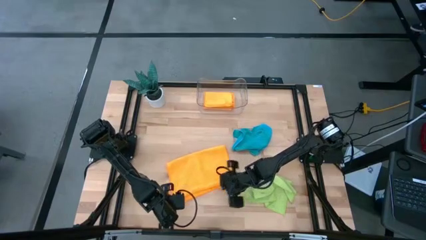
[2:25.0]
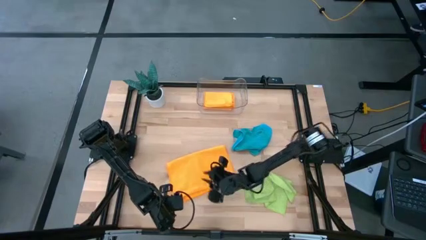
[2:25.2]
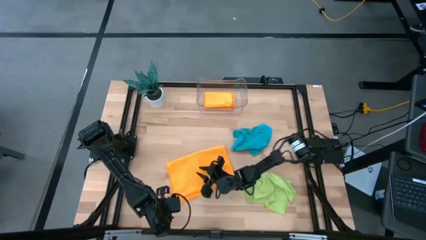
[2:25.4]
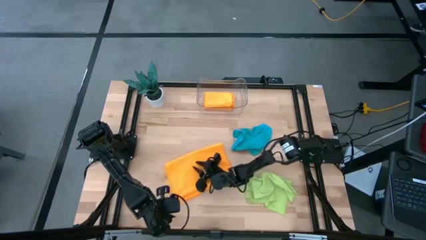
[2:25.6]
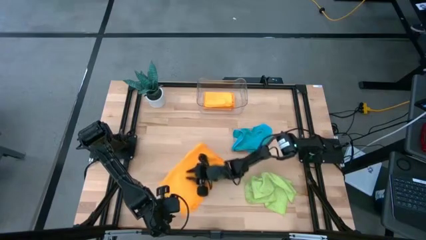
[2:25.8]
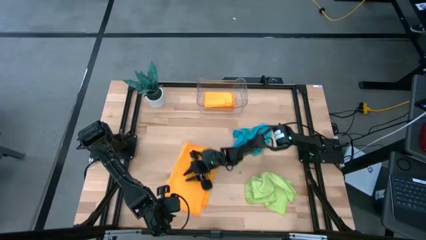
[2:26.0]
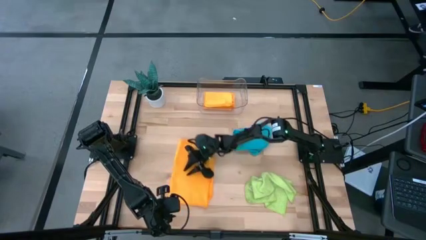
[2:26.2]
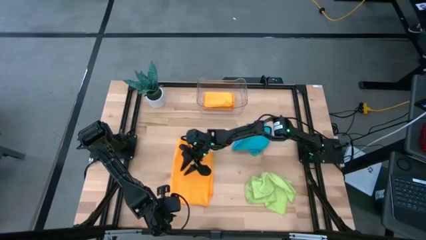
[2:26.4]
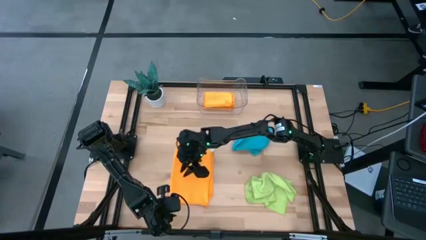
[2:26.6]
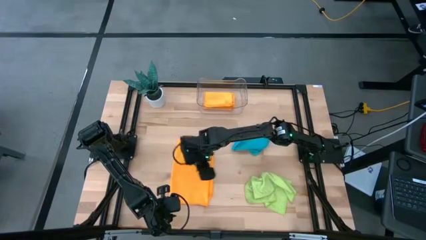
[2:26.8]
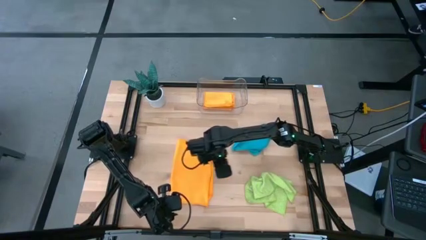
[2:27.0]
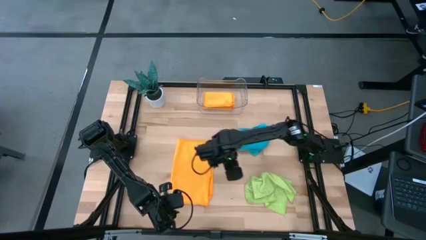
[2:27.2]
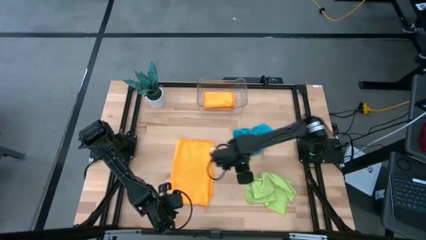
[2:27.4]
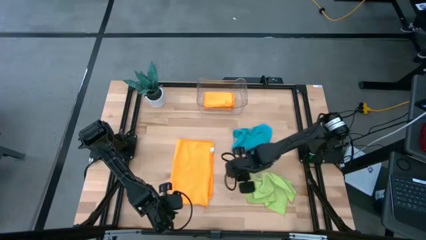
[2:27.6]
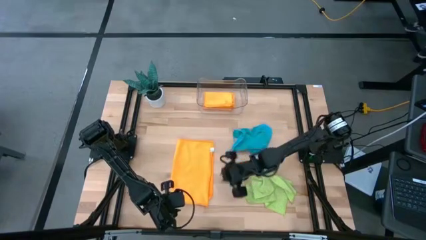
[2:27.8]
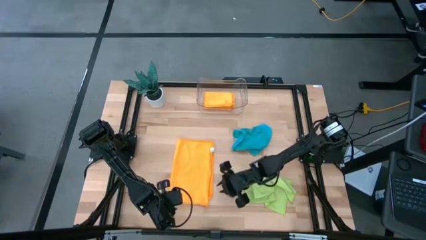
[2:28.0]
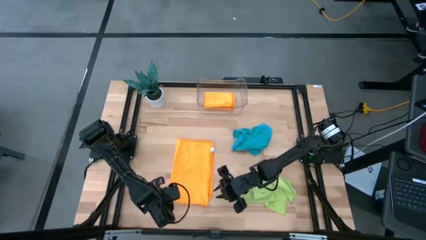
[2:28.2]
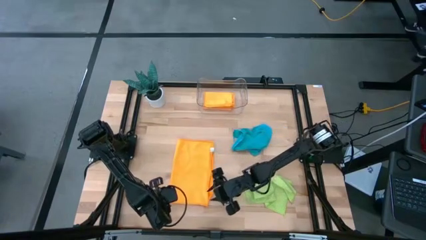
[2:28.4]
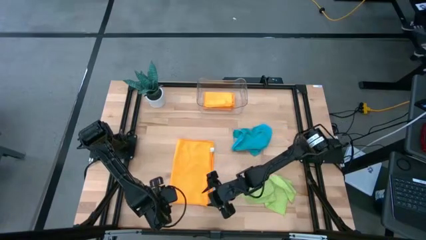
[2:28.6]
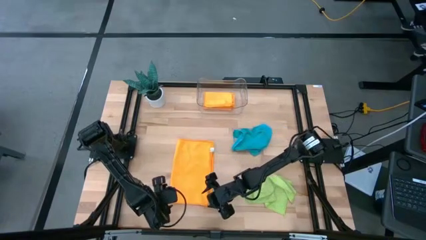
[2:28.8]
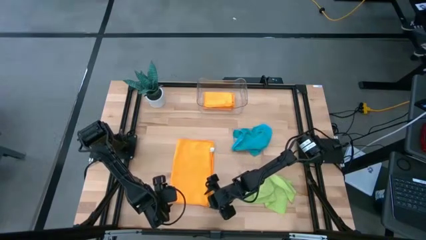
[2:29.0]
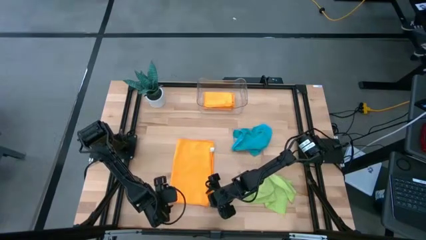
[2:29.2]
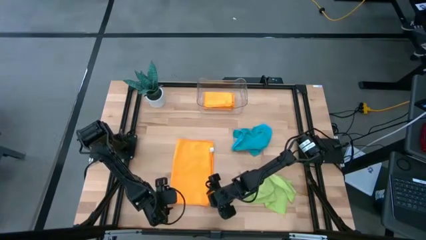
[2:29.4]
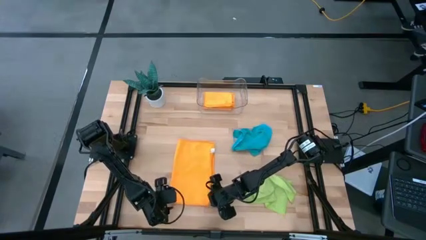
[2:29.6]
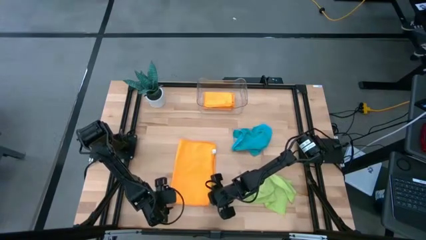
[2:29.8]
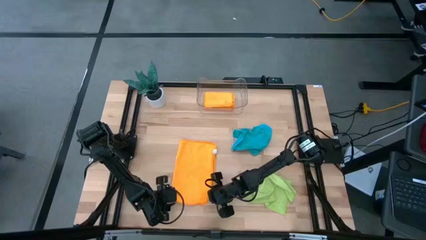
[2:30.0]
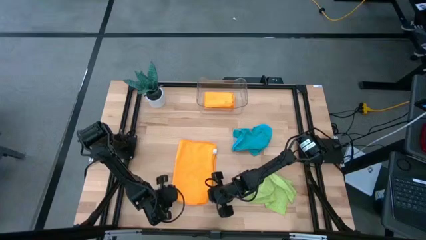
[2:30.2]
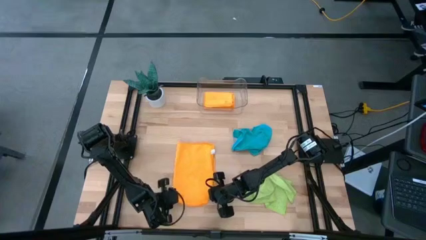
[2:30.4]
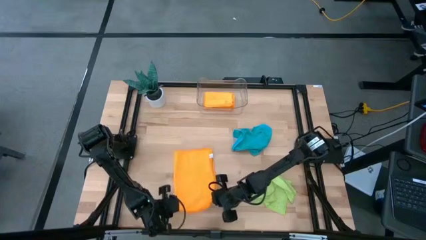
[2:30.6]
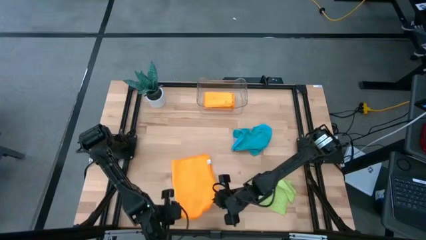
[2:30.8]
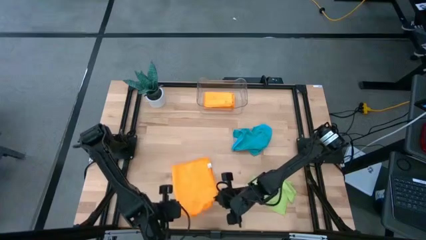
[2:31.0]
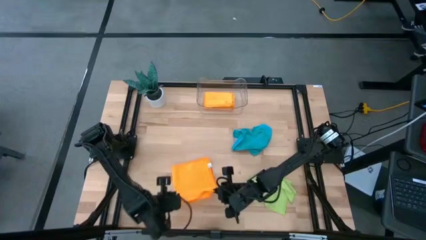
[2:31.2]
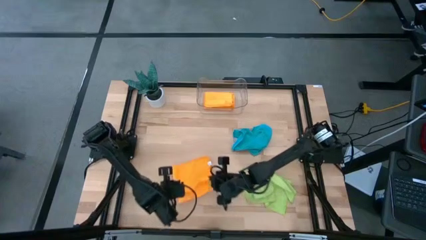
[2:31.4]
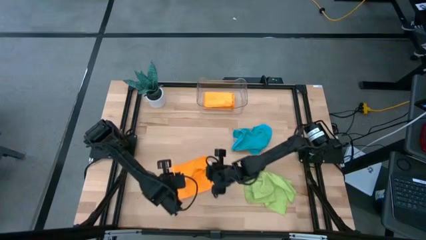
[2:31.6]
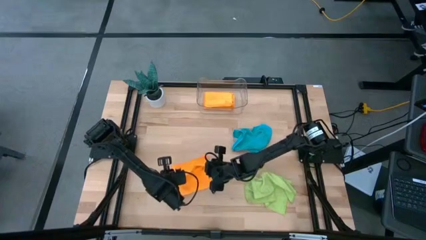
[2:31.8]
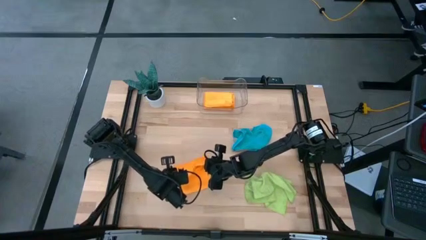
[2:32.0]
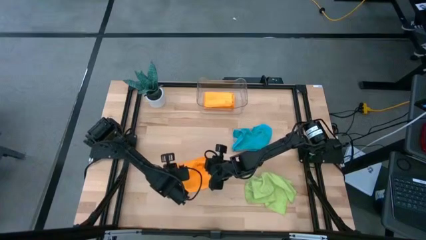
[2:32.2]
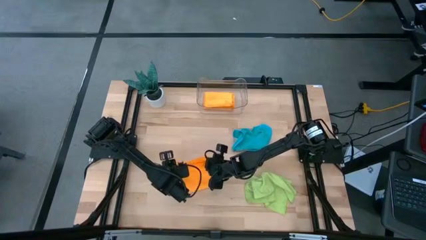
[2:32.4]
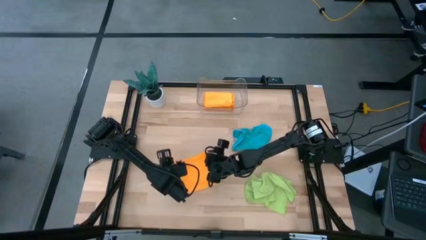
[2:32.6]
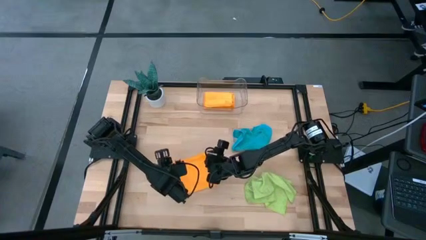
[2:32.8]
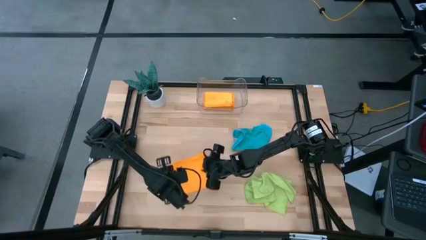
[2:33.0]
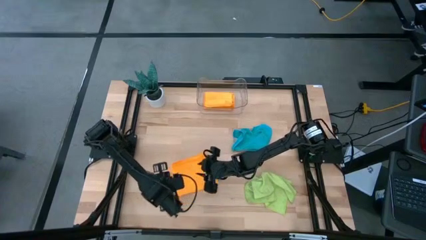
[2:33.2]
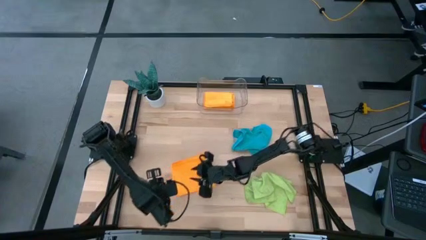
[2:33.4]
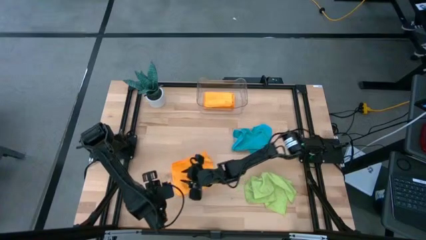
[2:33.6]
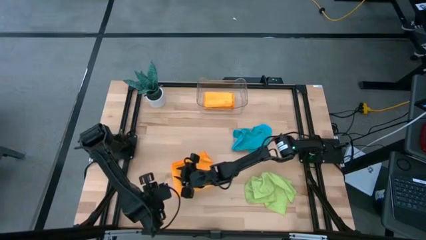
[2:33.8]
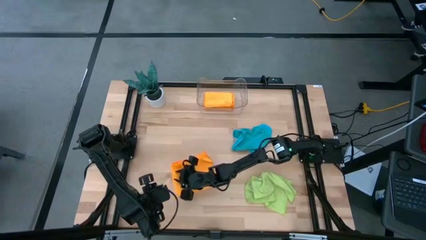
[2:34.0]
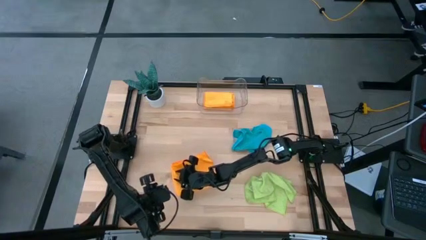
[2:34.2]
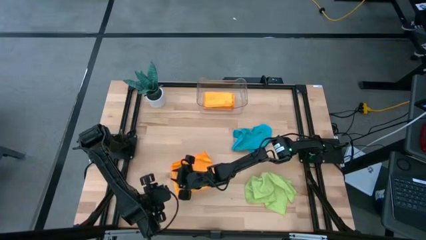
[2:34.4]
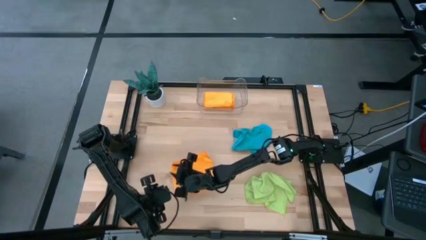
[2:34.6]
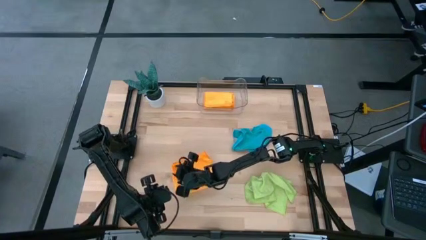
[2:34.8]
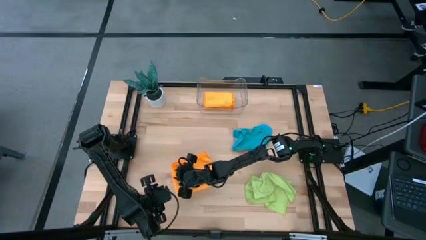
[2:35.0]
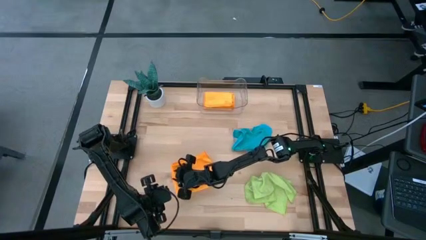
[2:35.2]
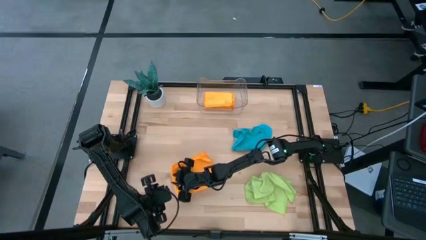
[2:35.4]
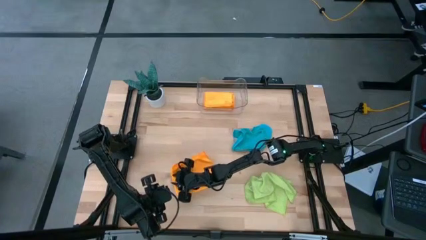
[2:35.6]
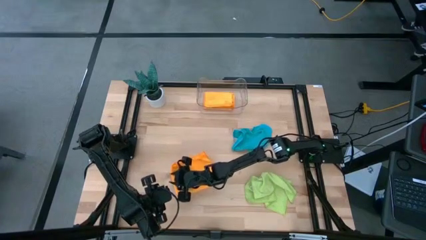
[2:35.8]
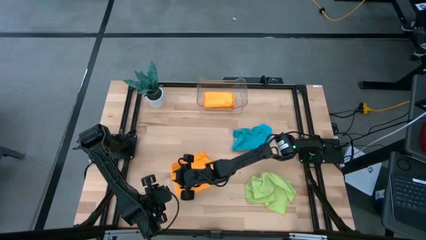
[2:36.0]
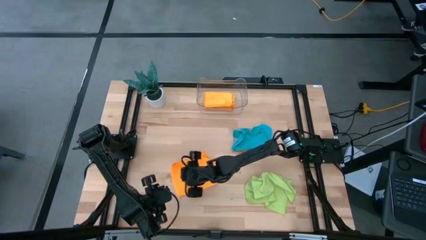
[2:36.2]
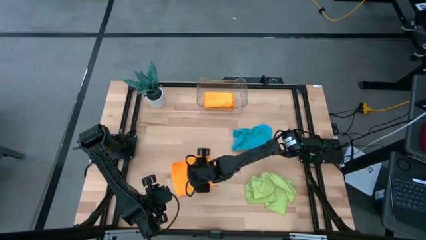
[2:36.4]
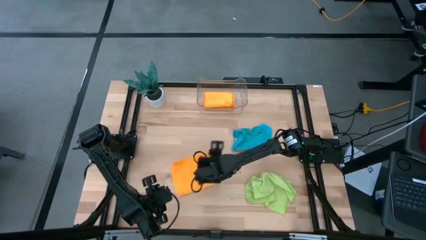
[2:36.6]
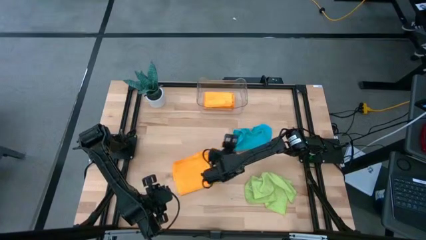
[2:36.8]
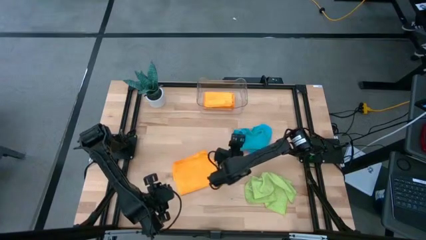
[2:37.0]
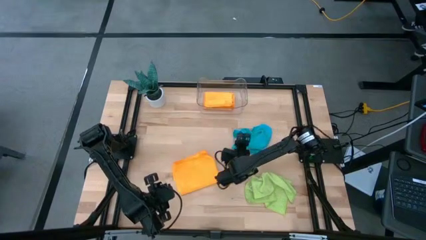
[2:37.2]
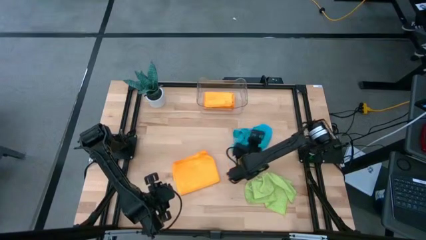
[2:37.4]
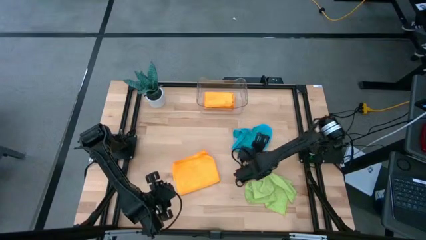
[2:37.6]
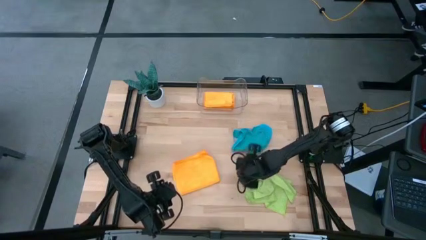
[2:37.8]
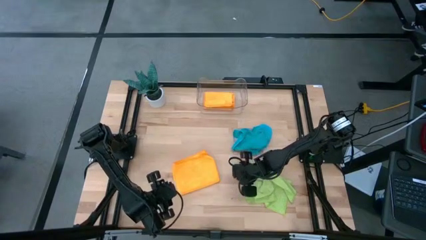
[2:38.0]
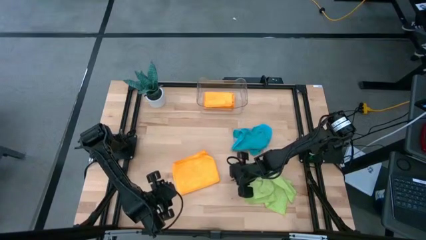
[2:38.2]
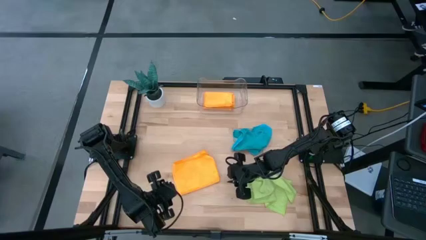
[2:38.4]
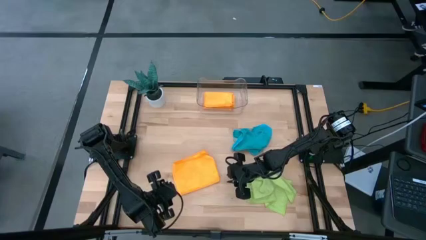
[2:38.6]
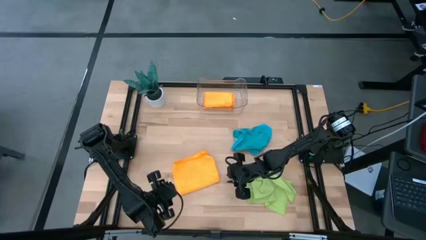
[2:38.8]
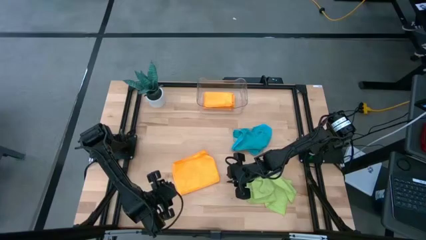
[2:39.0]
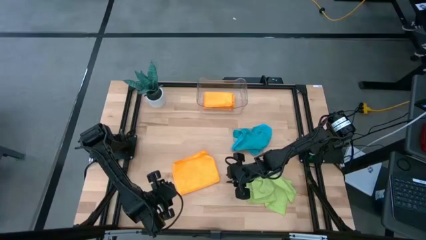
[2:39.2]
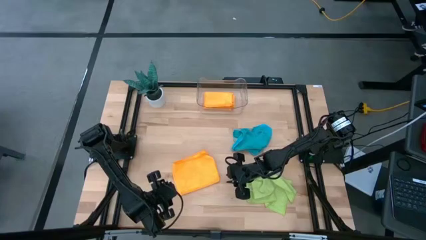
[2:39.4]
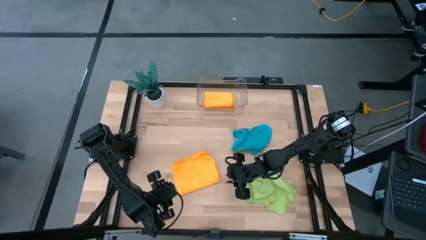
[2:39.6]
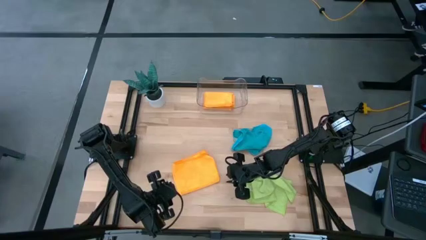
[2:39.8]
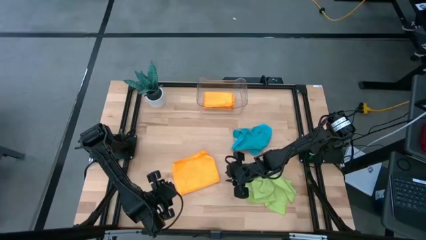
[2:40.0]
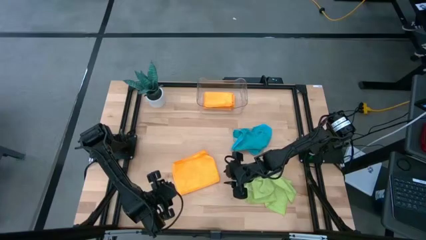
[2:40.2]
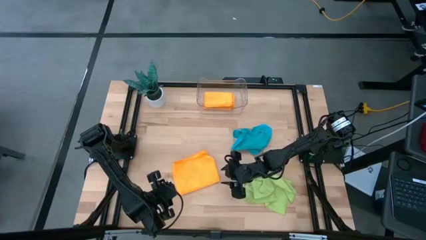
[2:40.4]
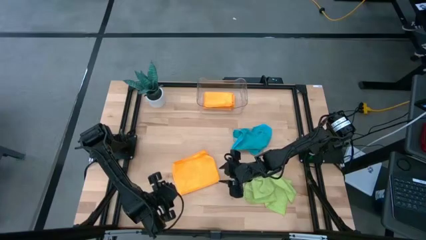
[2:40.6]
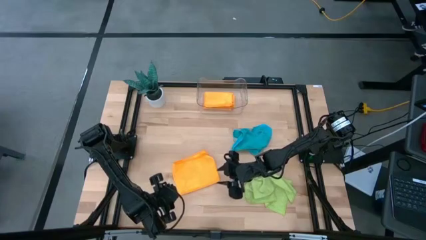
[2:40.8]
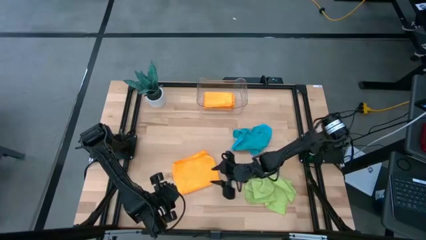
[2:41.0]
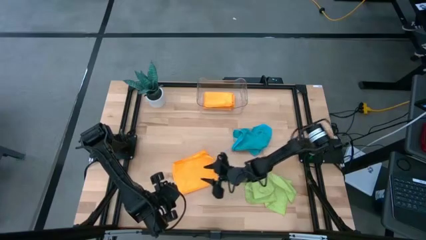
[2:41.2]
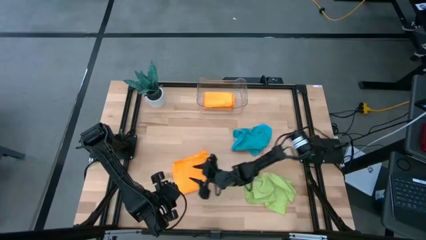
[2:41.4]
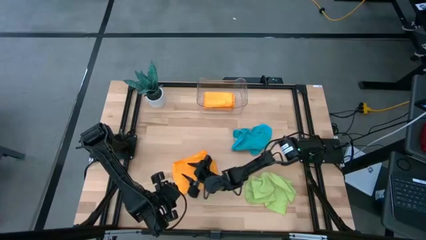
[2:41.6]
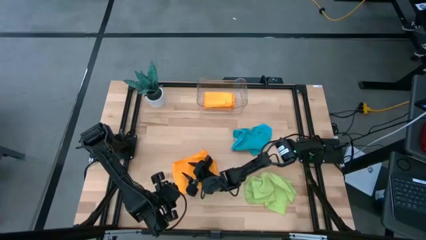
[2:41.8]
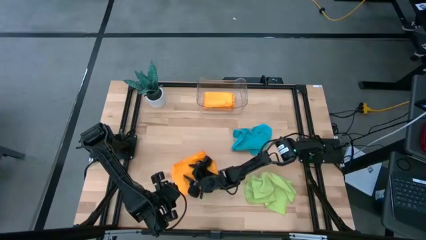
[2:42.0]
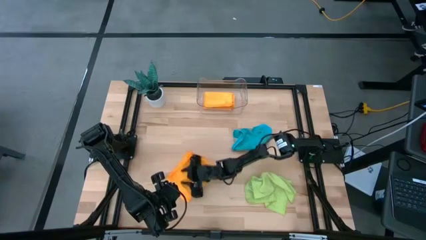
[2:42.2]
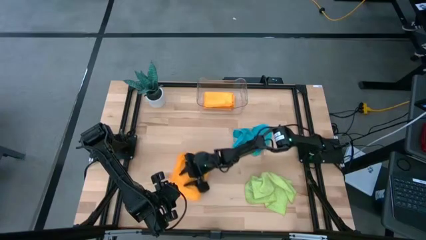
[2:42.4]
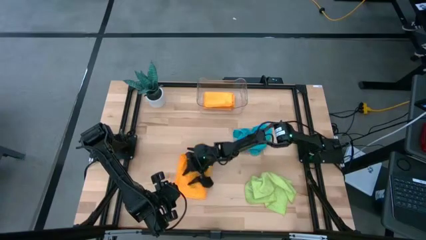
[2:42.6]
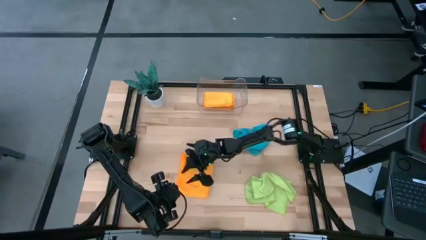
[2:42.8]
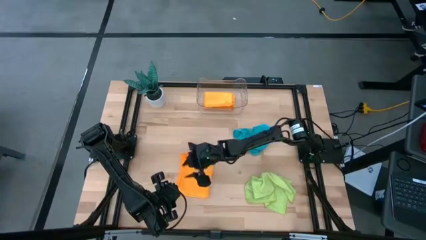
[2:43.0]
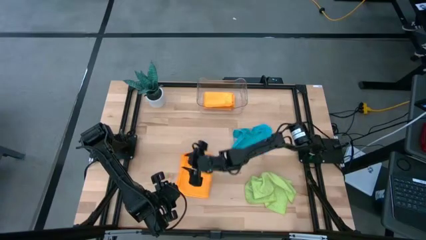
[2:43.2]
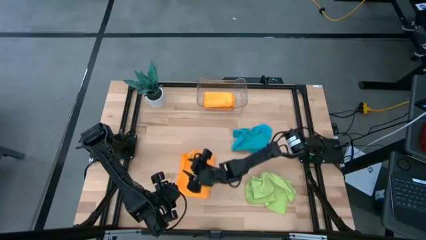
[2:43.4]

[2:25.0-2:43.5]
Task: Fold microfiber towels
Fold the orange microfiber towel
